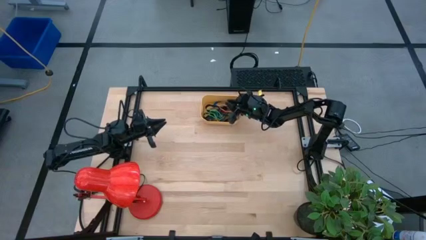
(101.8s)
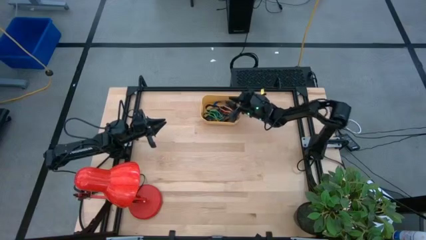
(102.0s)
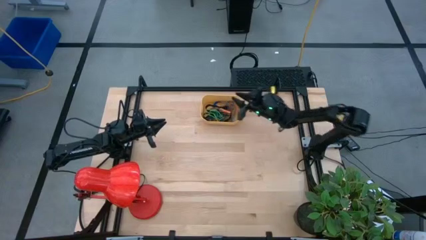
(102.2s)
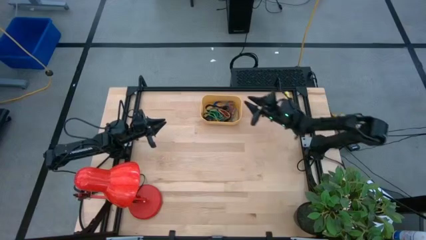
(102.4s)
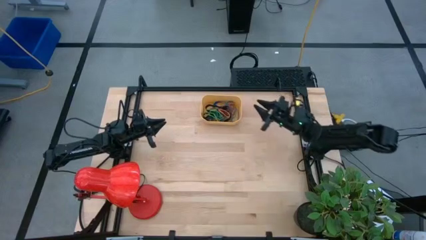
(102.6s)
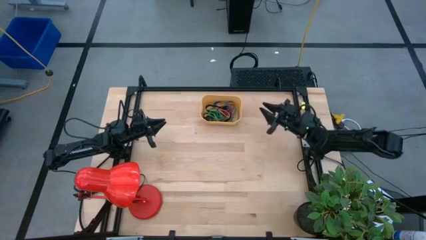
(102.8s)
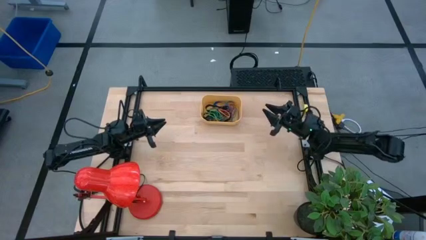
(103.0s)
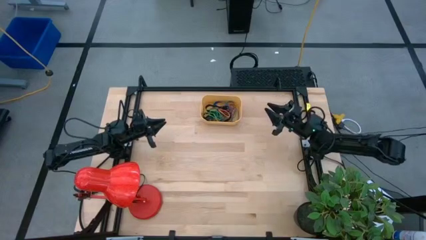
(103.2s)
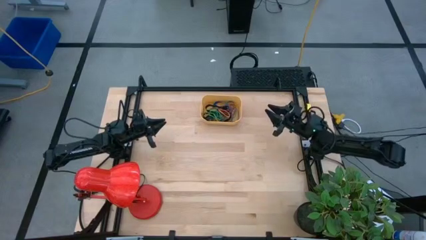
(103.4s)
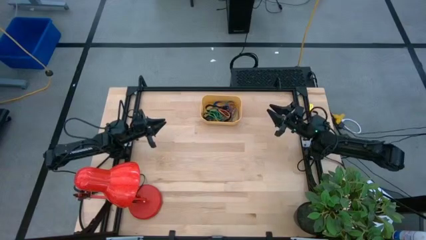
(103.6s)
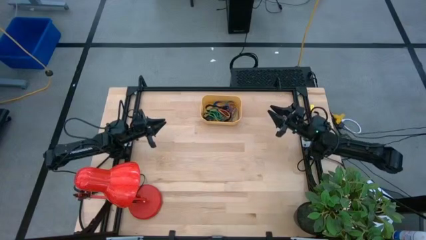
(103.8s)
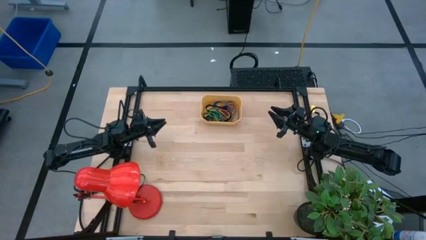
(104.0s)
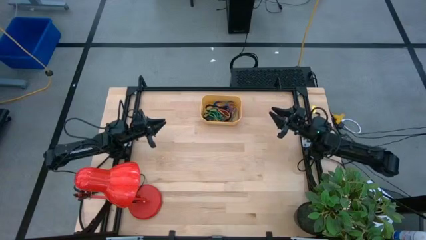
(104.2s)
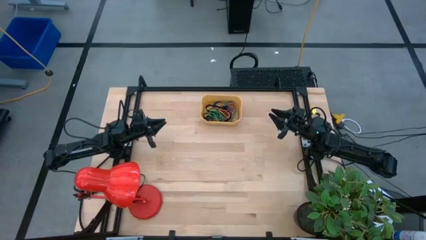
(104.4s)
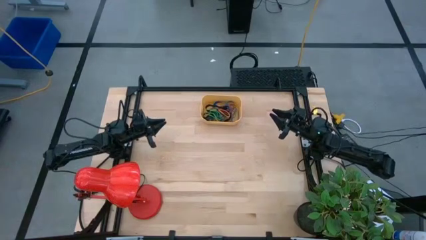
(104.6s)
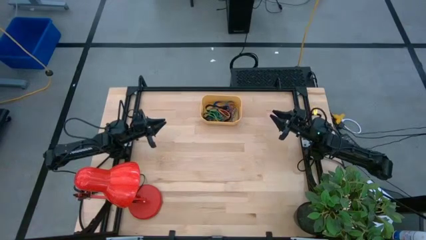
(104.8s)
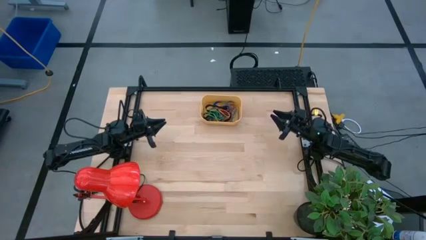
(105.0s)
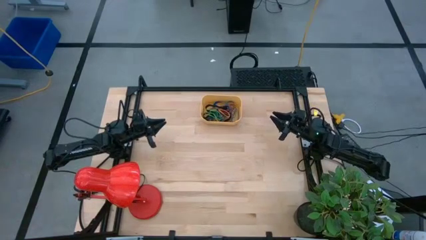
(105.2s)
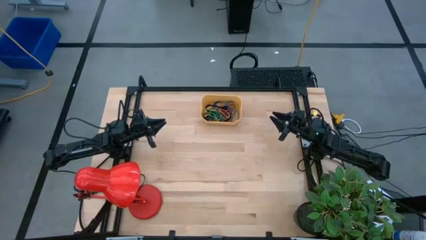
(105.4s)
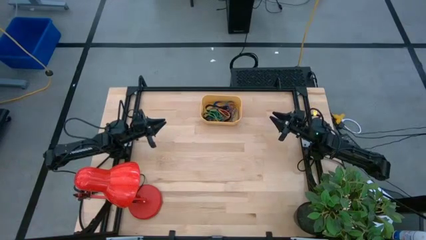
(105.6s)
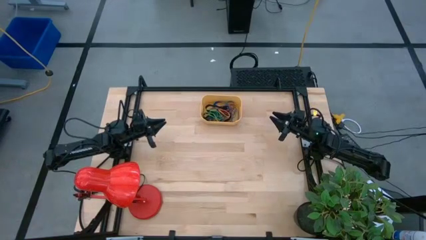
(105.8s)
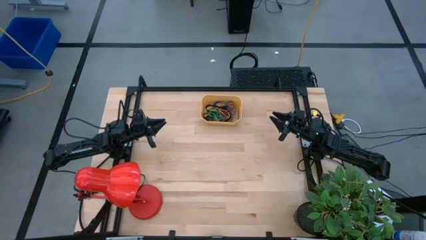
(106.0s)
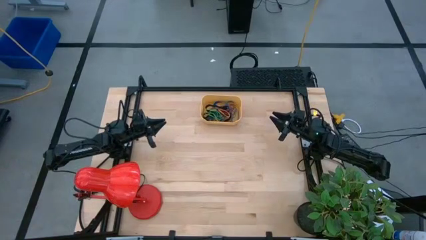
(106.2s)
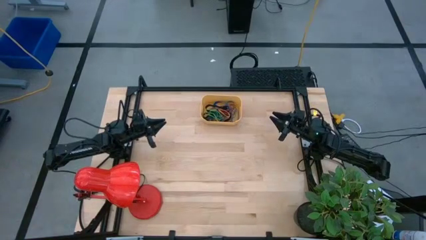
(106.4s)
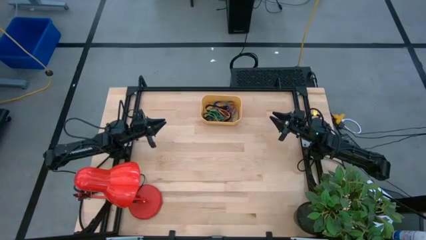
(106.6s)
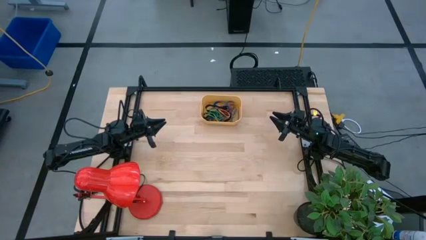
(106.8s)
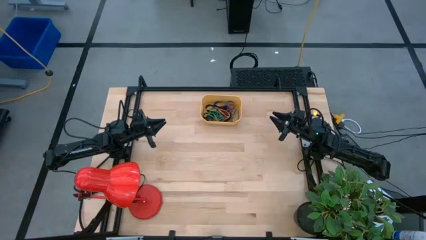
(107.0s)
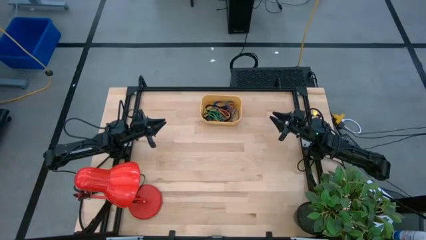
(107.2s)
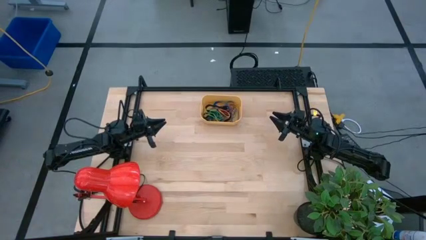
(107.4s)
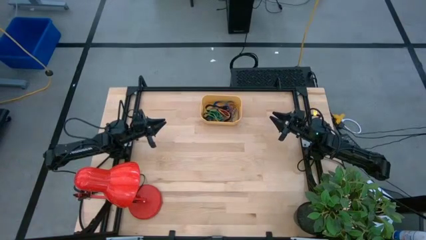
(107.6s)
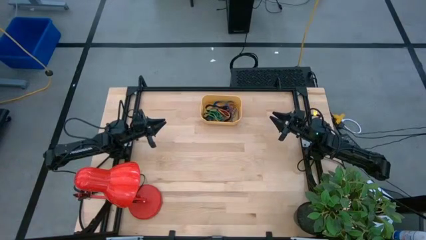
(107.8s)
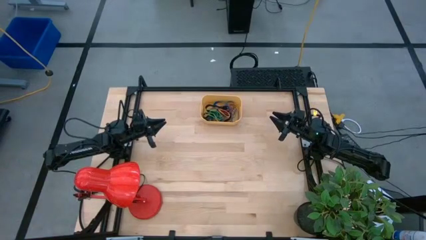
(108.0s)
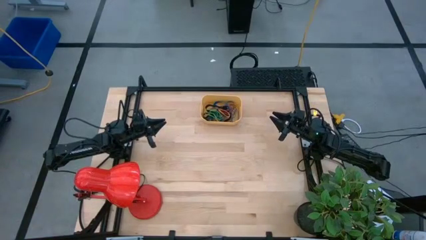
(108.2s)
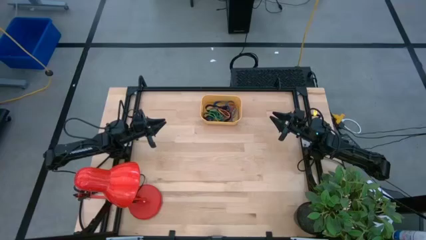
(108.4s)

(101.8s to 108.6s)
Task: Pick and place rubber bands into bin
Return to Home Position

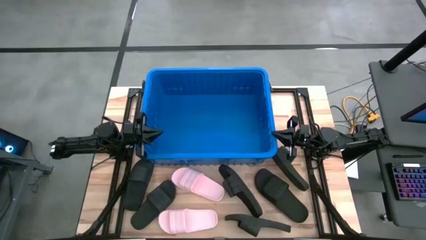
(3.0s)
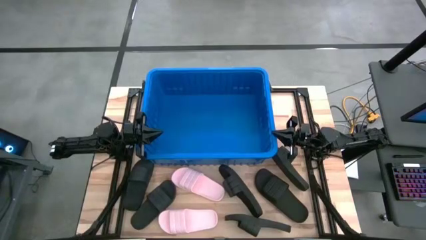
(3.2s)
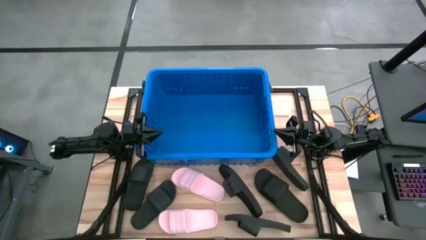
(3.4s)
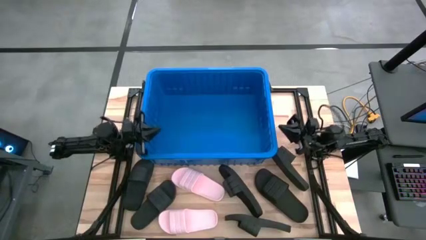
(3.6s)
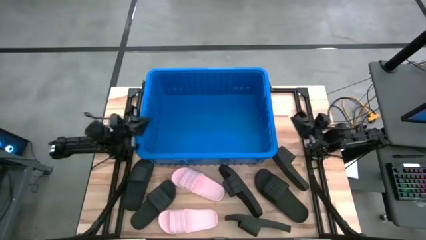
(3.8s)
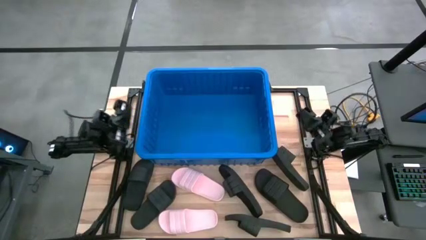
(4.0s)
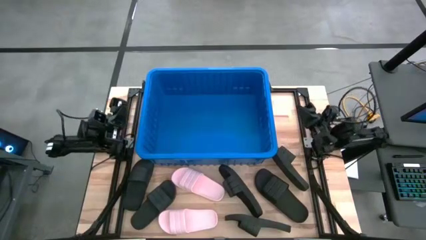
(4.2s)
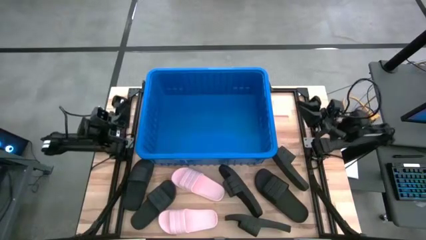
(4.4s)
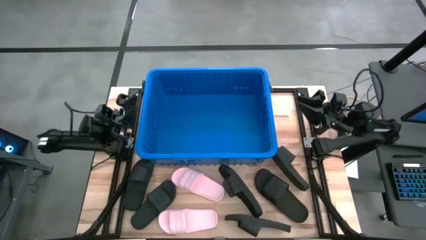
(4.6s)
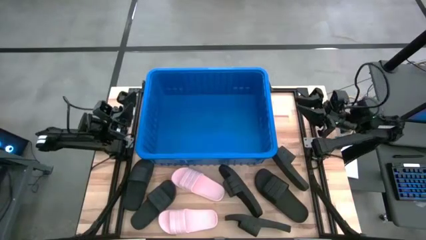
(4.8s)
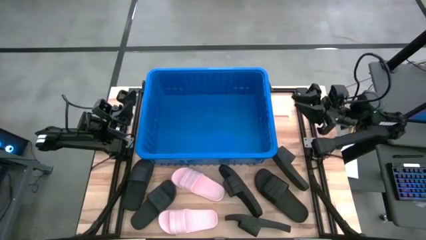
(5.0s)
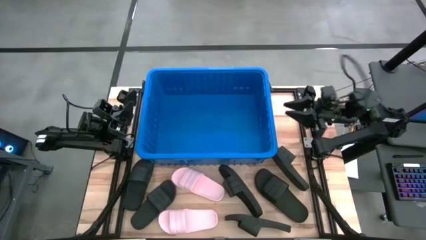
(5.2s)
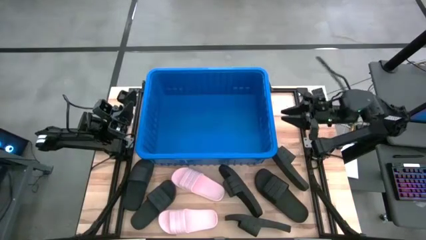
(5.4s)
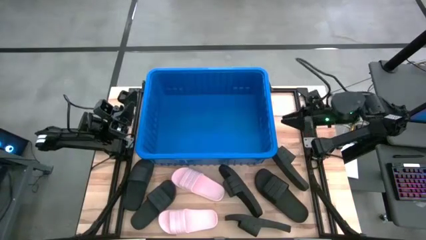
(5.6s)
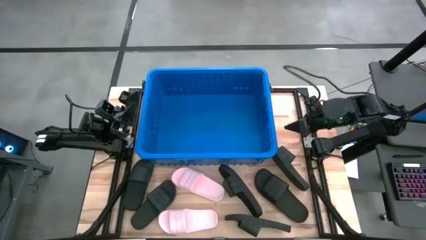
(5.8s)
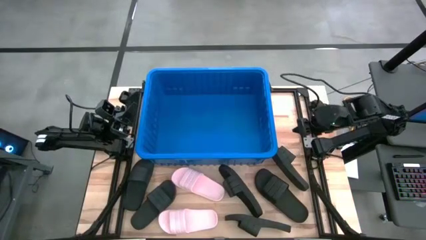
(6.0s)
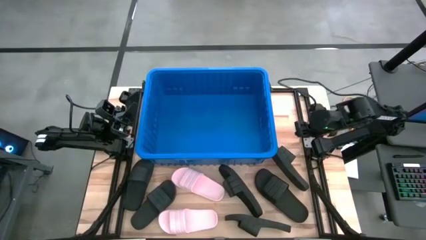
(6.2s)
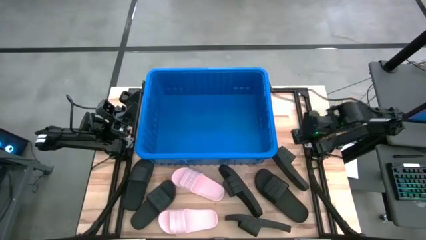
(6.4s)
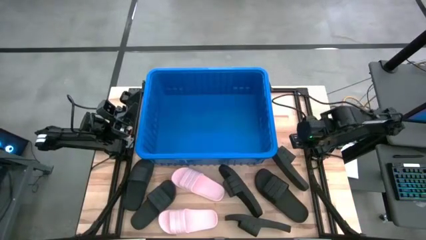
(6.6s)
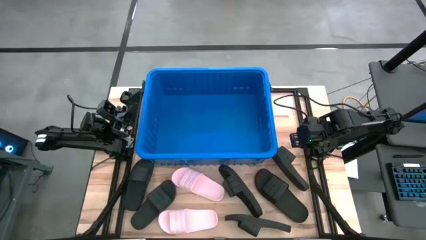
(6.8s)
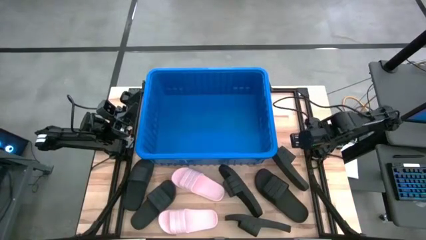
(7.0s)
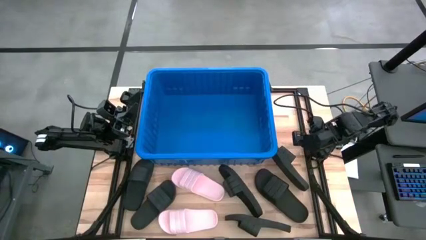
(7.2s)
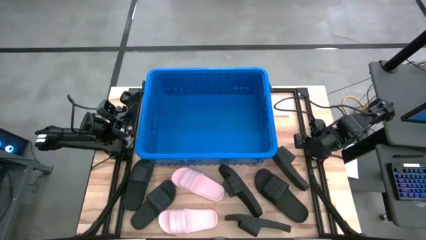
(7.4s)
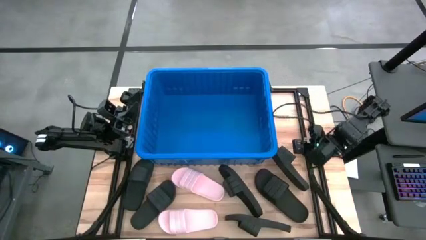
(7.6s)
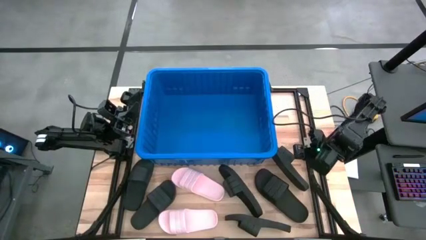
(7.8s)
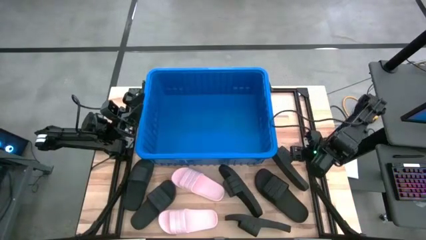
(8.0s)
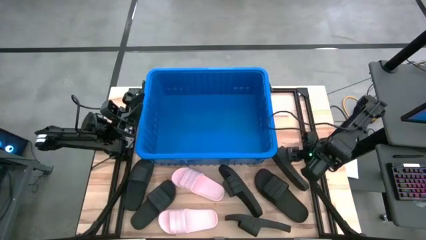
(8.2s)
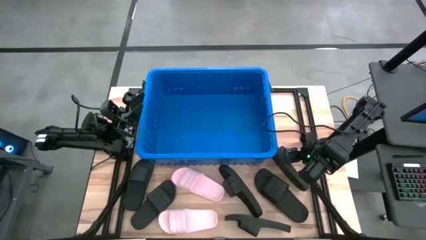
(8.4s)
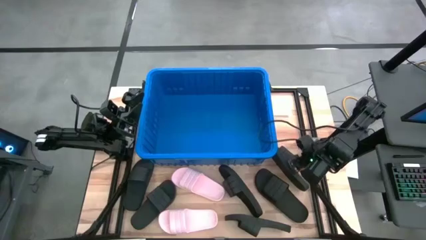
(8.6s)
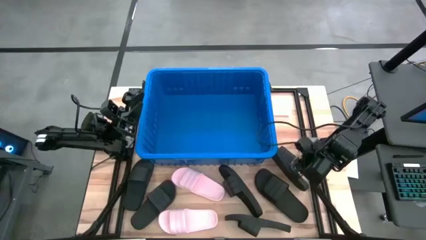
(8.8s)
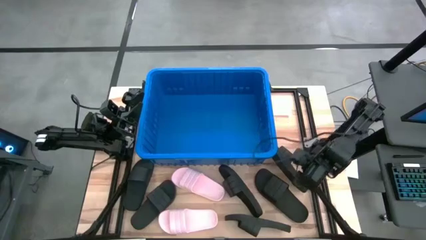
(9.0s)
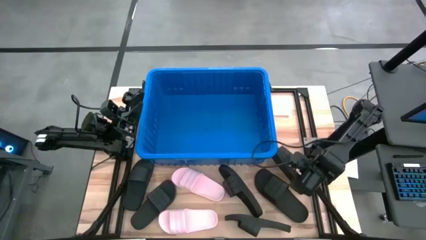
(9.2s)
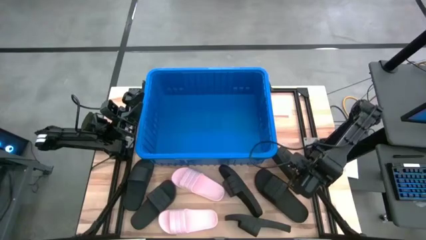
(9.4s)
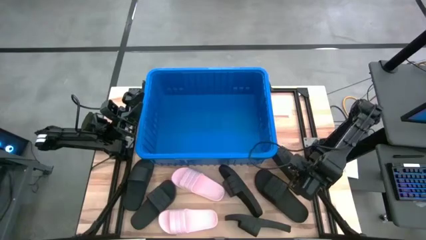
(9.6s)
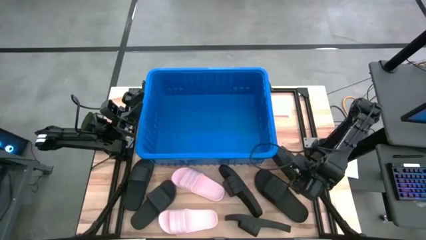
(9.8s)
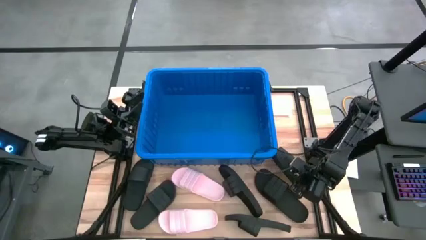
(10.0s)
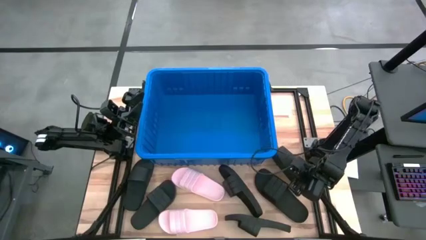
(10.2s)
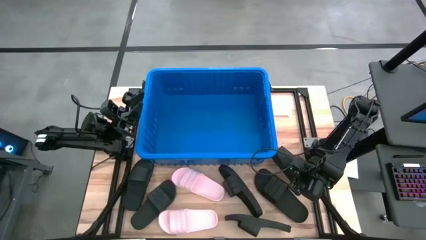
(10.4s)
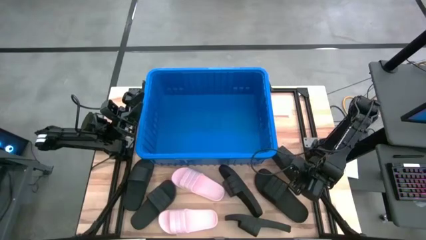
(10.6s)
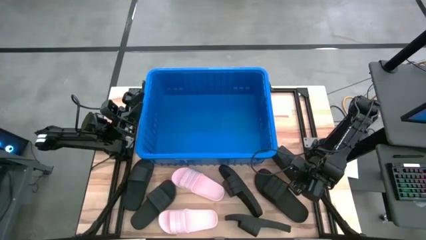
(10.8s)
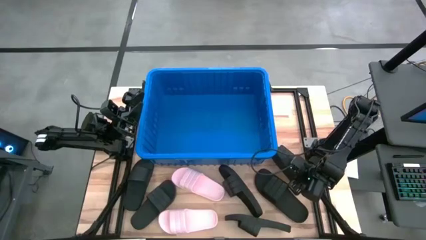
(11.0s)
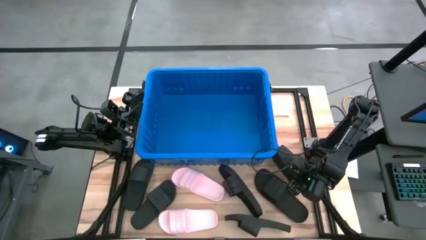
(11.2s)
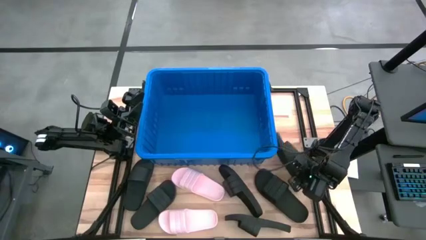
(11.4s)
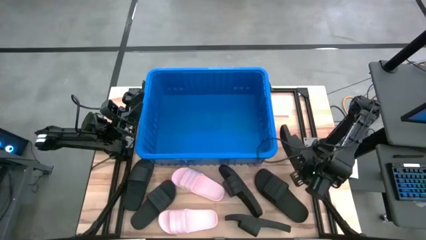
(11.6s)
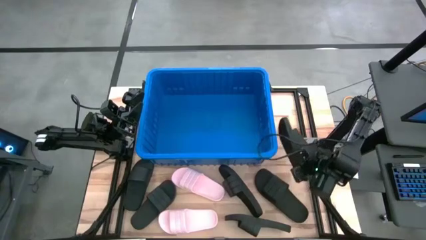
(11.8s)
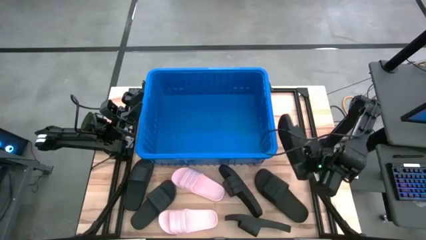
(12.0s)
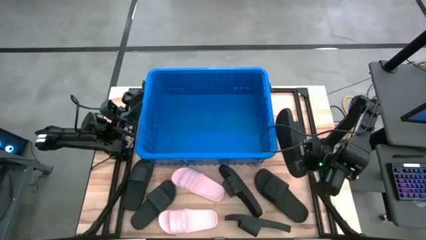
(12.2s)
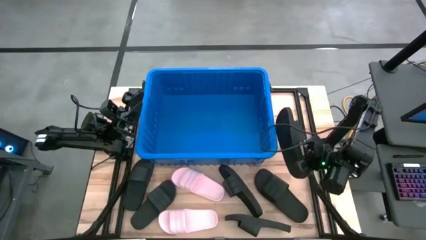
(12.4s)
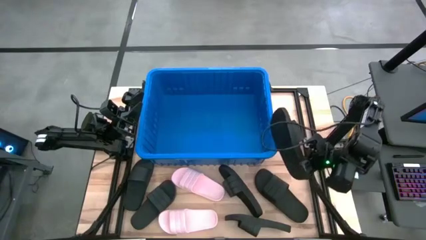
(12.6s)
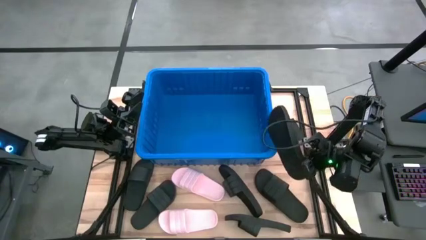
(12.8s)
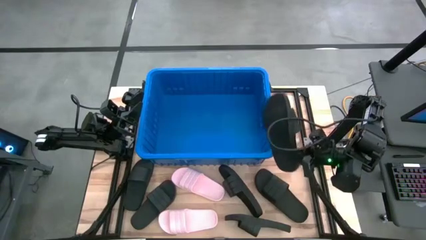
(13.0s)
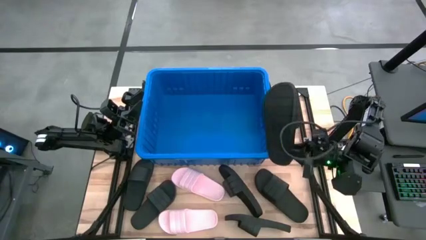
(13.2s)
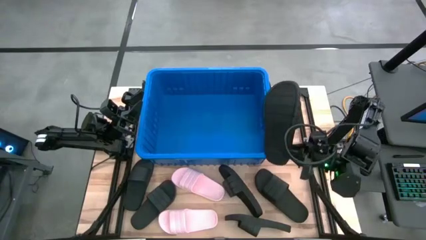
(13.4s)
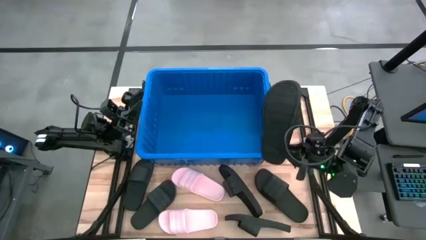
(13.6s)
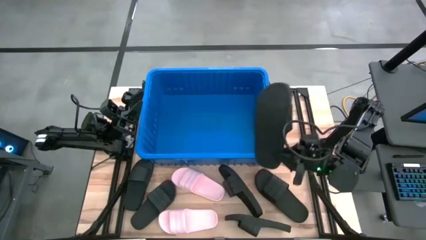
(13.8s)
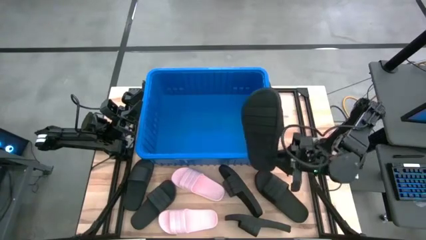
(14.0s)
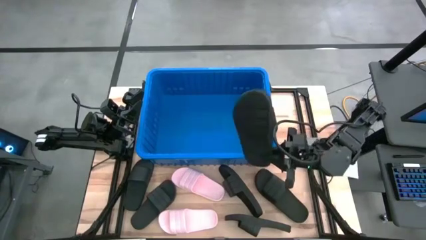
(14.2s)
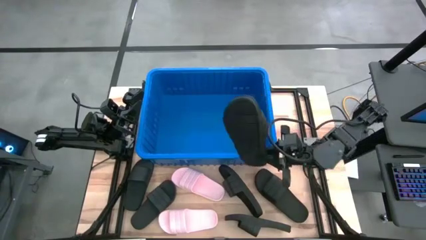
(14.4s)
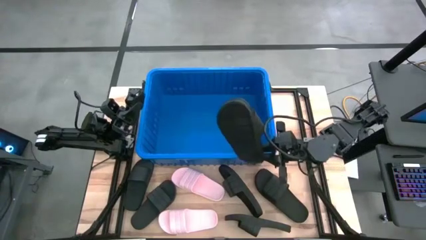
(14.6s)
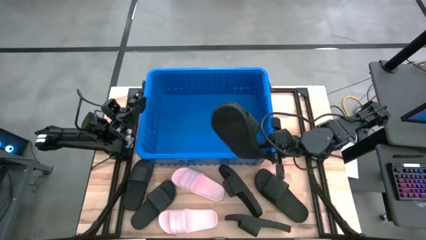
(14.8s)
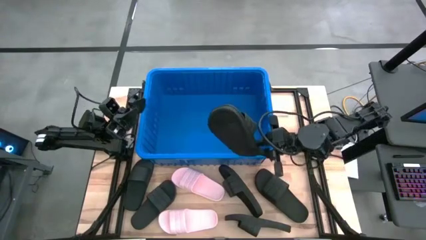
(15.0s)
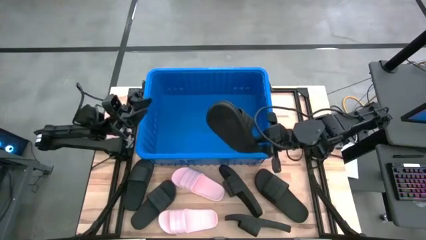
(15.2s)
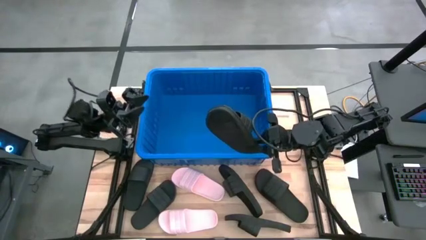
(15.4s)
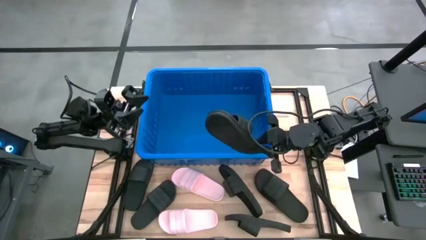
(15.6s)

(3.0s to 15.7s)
Task: Pick and place slides into bin
Put the black slide into the blue container
